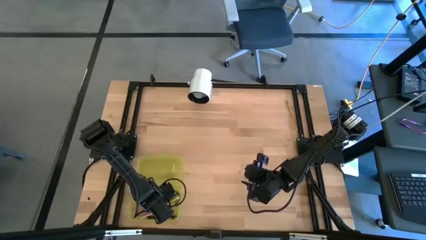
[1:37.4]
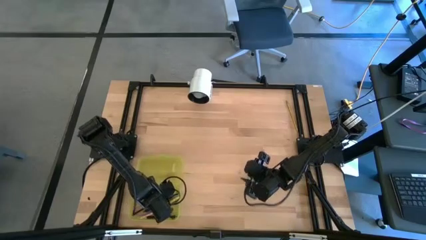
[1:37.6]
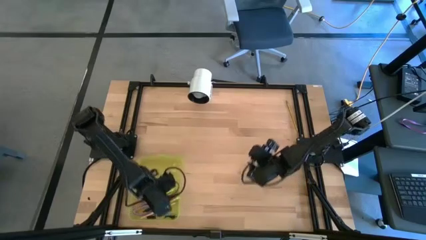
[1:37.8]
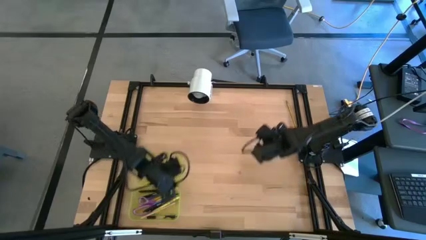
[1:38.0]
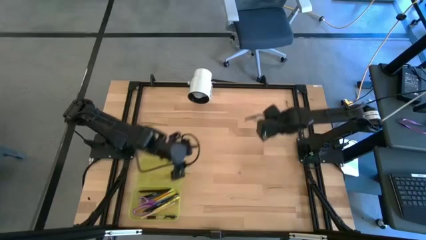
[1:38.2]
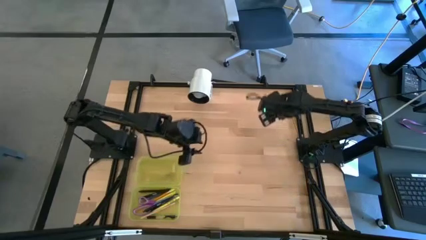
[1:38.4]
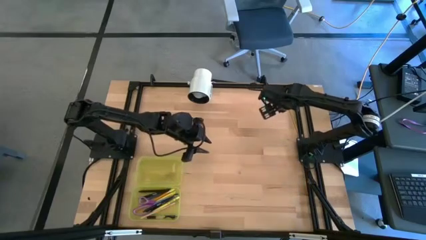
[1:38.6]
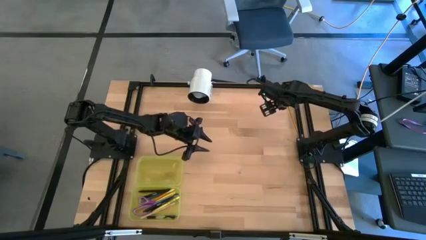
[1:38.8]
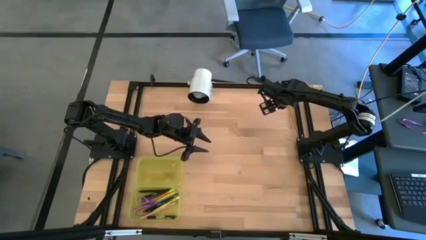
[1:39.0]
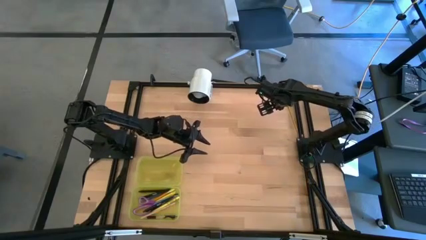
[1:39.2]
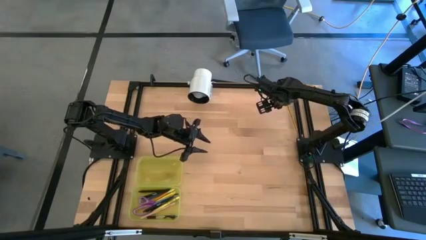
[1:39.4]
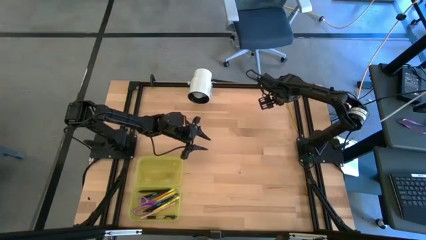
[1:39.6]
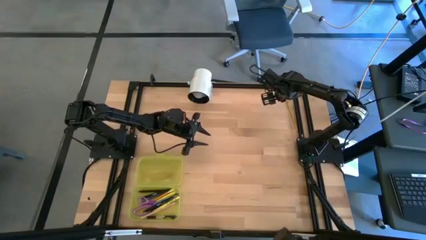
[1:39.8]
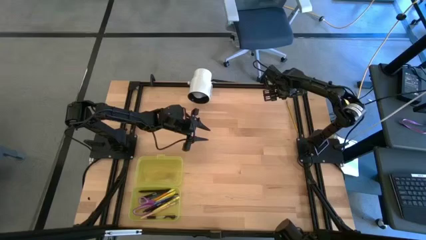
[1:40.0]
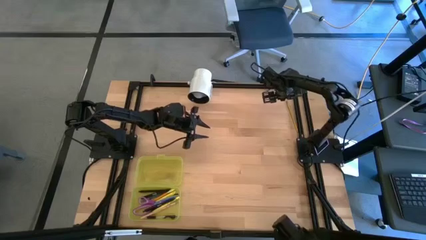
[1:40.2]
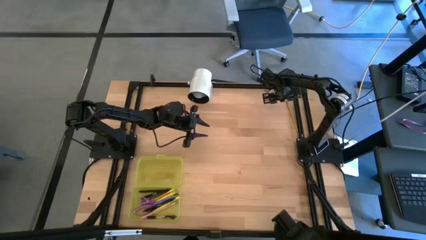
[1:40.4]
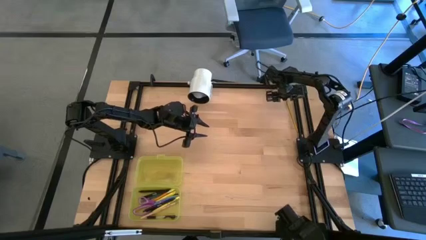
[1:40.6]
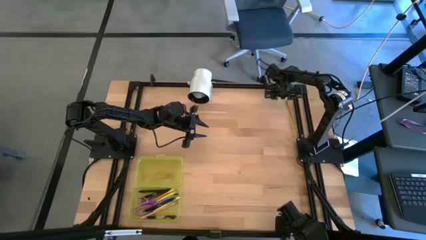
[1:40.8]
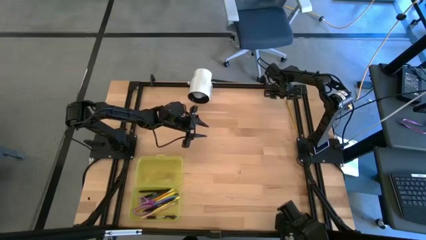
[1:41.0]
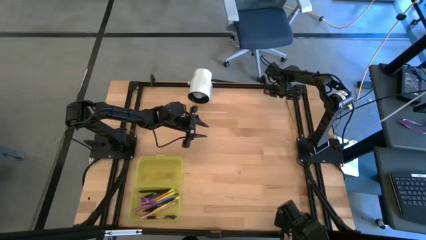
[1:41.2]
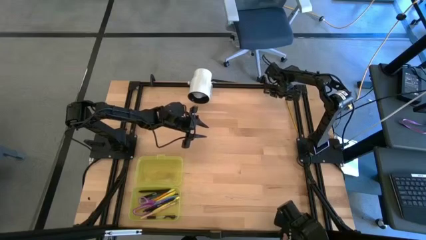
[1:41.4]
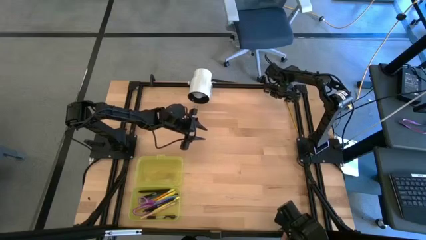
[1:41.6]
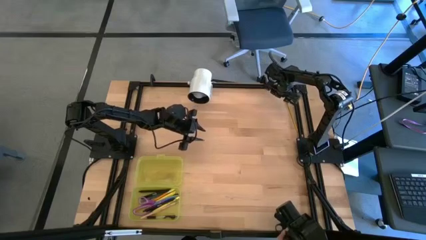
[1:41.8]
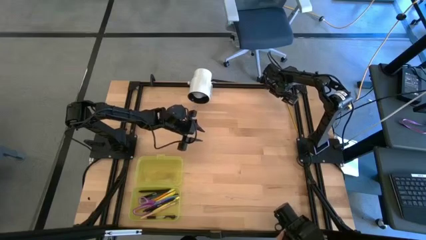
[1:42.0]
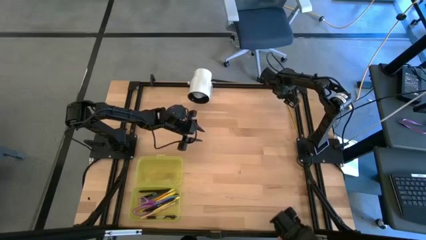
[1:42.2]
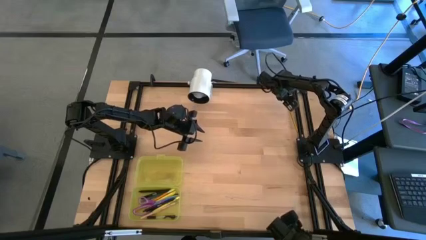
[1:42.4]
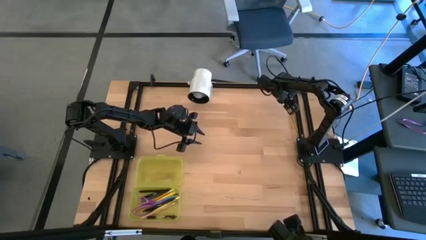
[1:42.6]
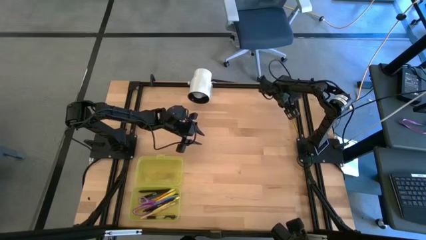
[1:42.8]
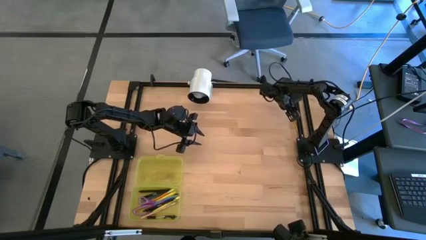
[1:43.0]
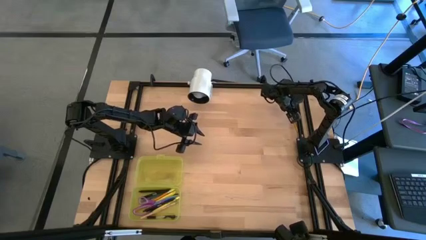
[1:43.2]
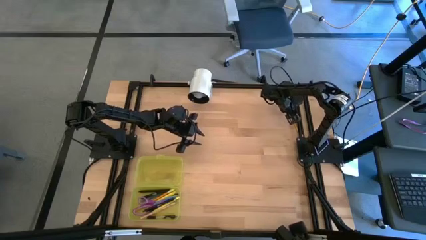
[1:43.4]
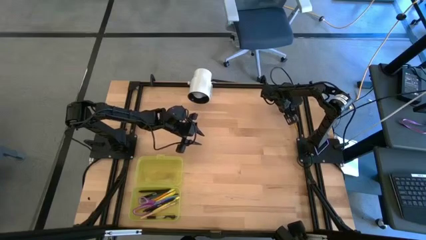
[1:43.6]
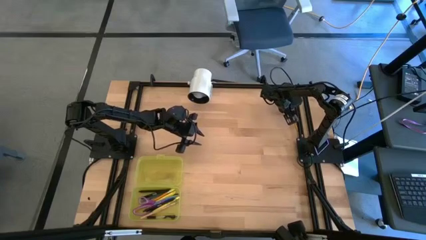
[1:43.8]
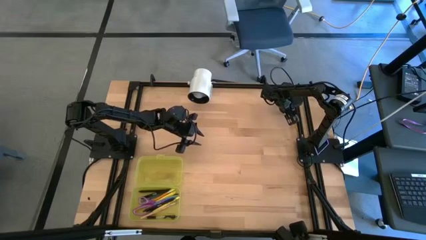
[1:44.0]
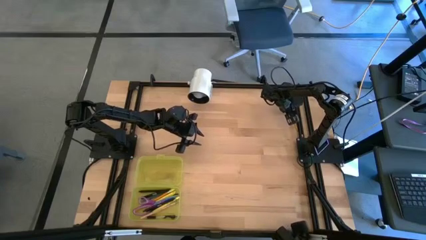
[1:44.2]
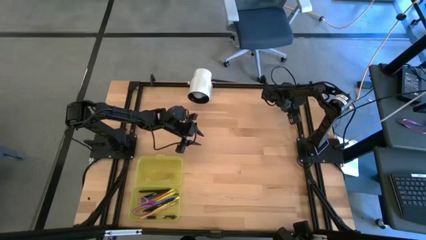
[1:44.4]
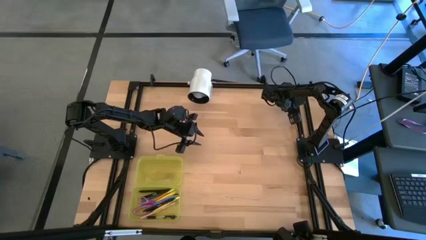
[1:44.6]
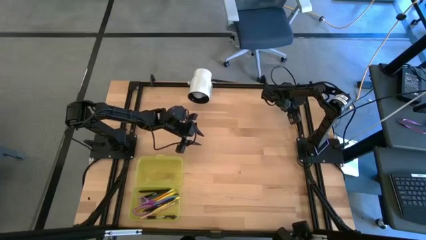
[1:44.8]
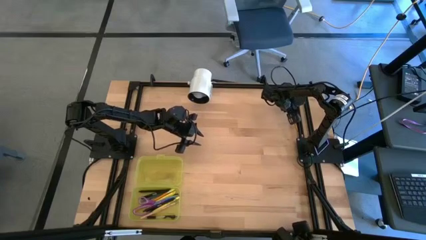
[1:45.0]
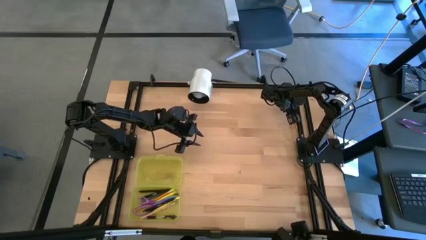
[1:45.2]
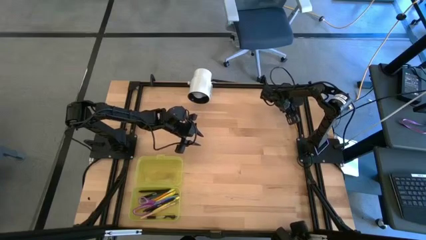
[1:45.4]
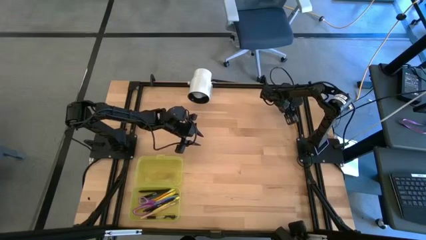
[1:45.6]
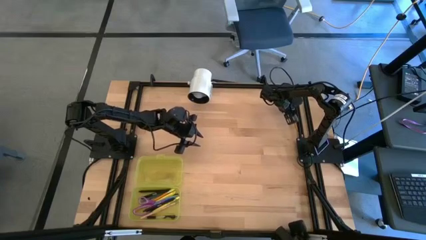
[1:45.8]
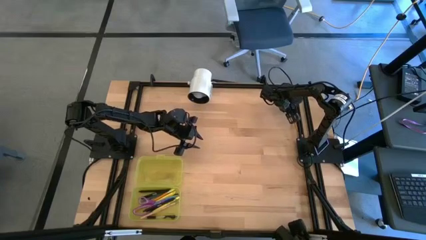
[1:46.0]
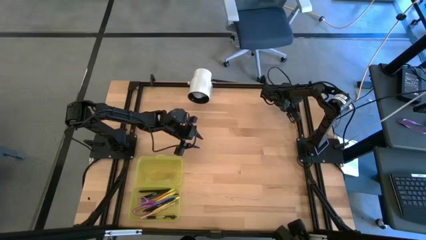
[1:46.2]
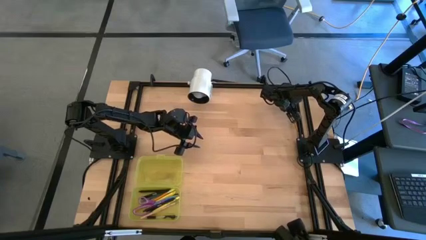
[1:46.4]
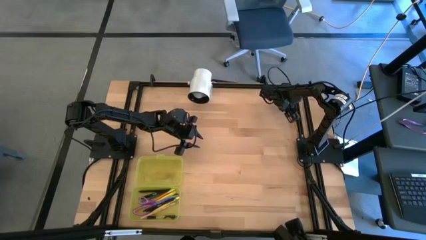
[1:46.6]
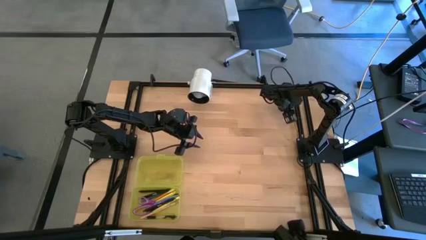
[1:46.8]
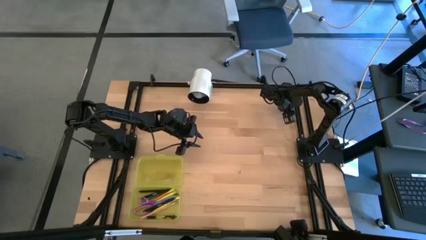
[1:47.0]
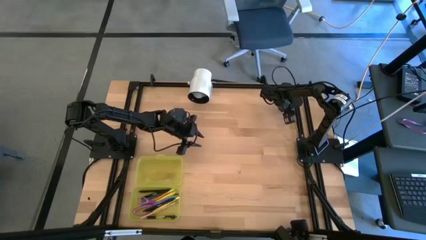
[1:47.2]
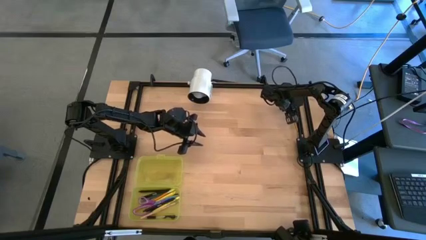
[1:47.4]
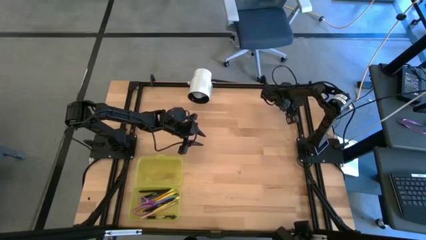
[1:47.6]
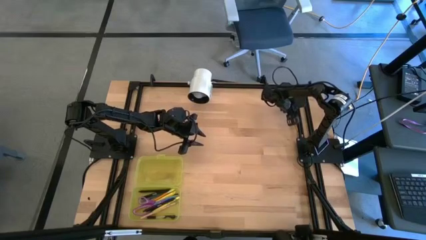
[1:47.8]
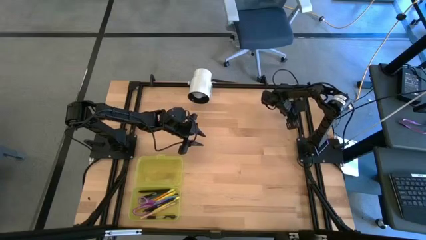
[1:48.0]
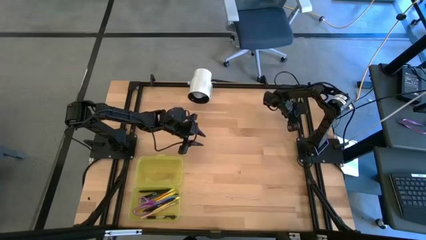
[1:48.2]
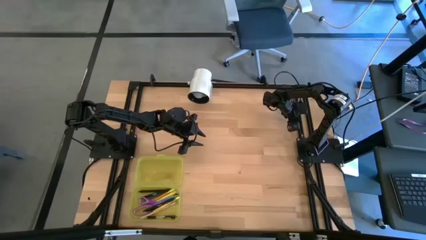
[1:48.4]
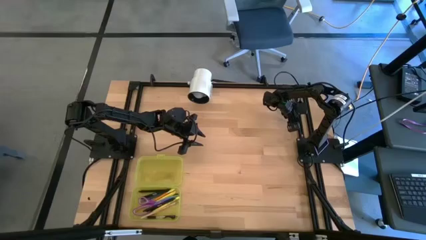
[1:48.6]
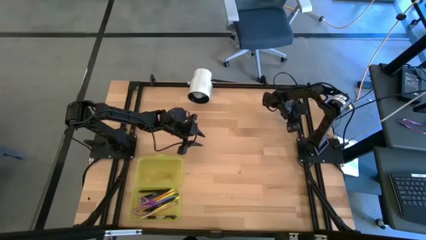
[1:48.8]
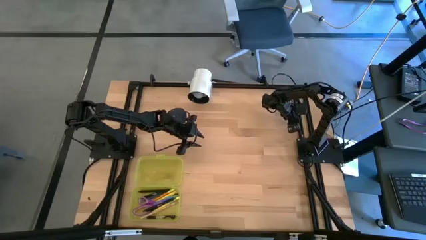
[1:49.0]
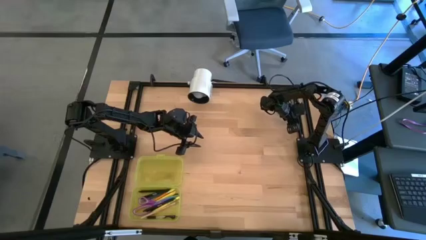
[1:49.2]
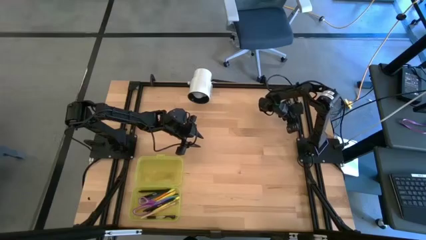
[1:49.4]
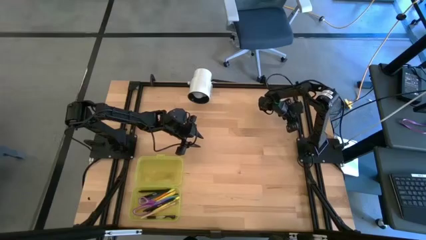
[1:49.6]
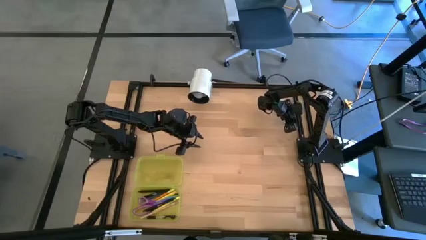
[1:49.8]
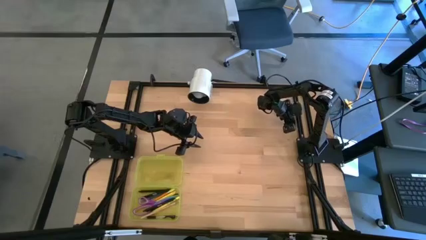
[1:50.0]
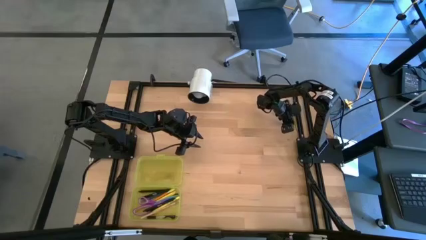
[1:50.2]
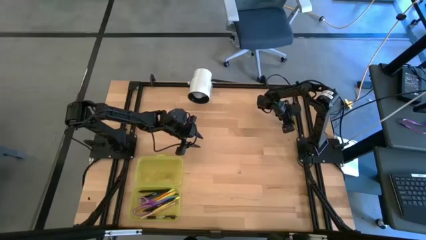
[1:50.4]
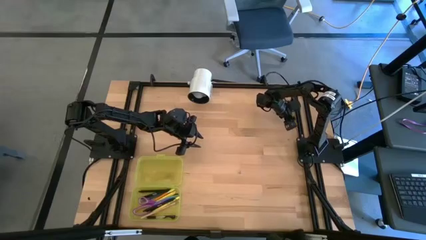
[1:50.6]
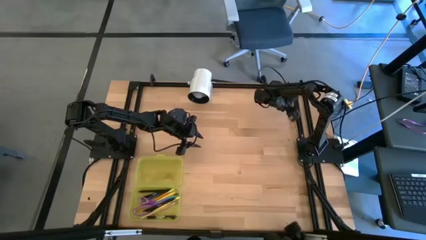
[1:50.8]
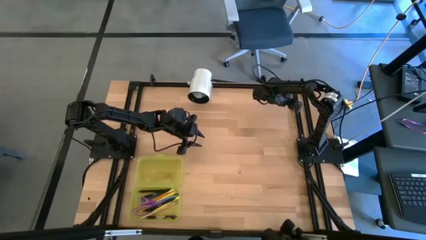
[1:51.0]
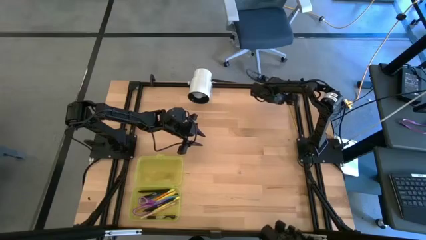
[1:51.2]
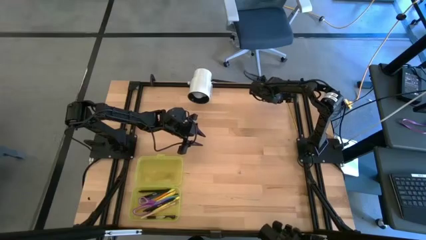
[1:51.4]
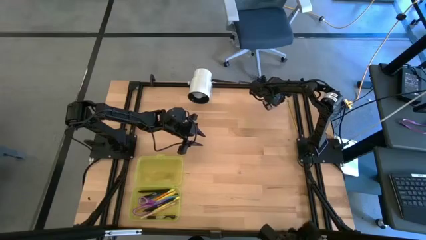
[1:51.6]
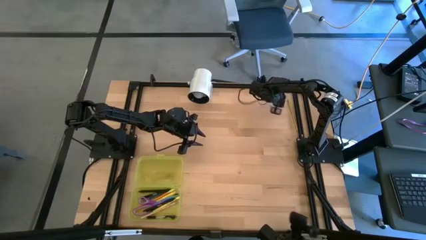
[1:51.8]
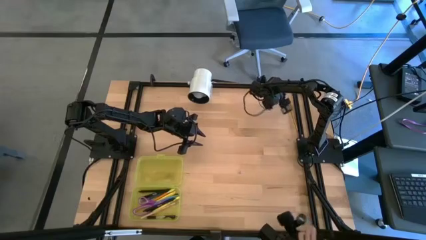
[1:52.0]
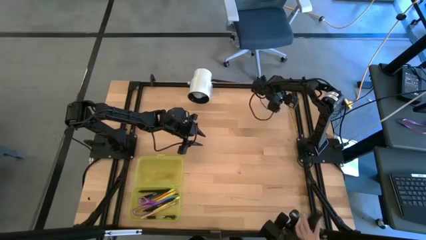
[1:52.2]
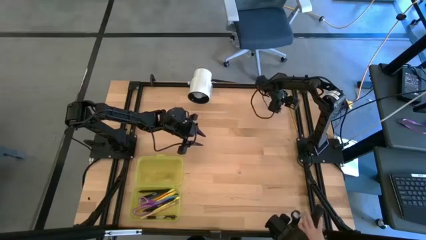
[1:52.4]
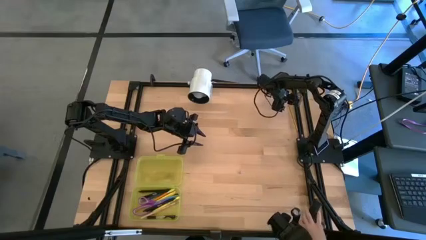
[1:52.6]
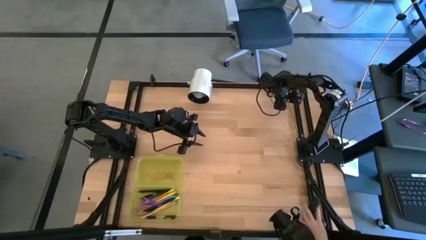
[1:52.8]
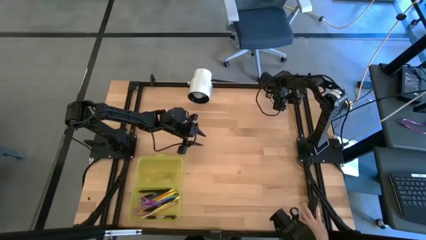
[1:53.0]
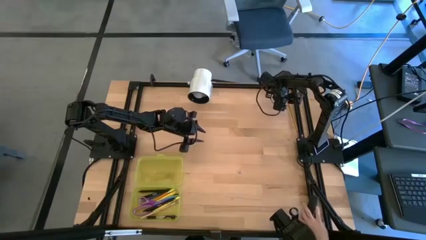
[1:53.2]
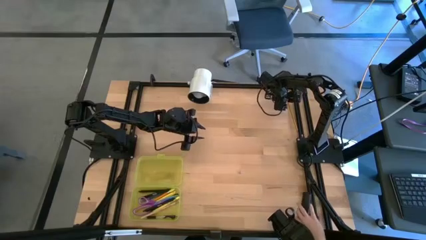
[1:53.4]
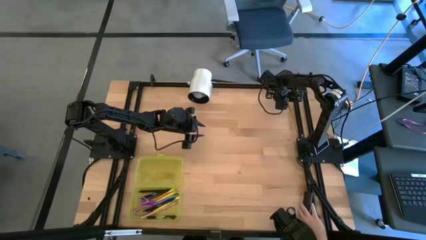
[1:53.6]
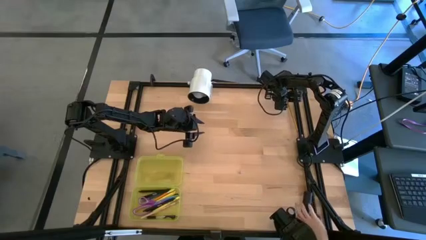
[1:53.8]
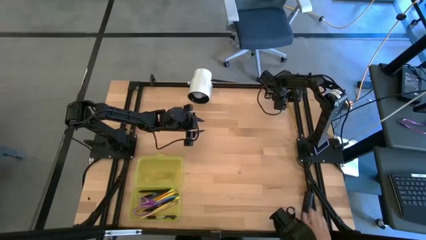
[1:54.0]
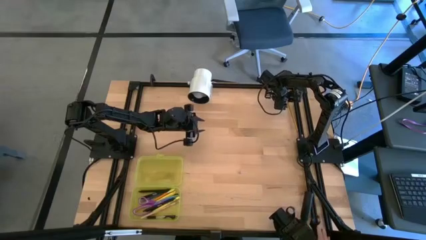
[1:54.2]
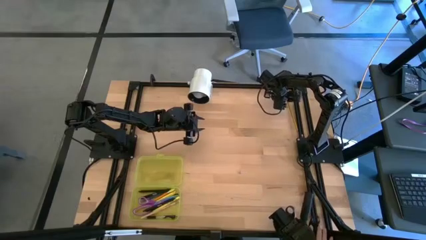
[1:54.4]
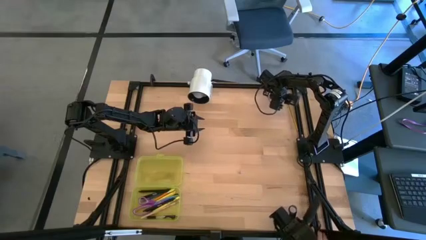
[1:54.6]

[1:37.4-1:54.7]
Task: Pick & place school supplies into a supply box
Put the yellow pencil into the yellow supply box
